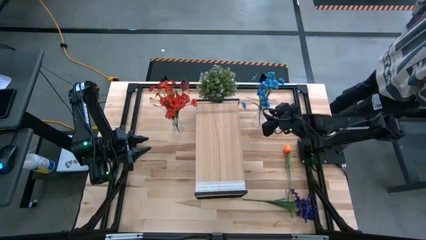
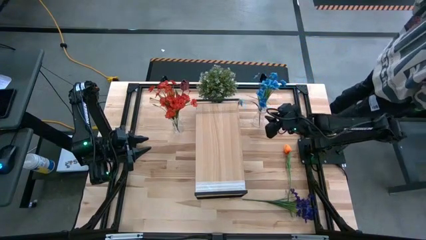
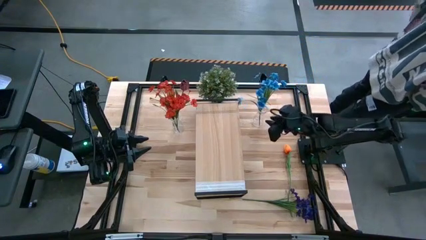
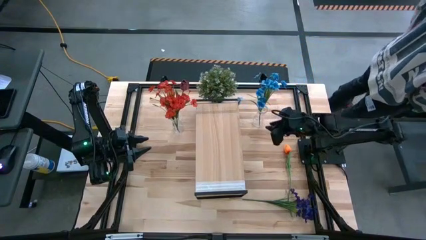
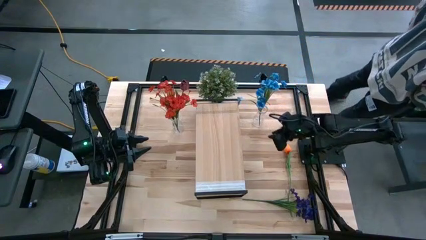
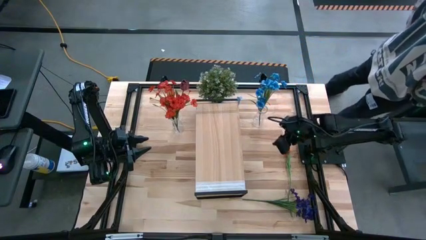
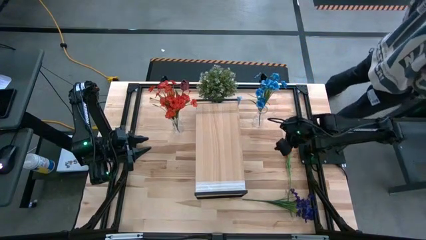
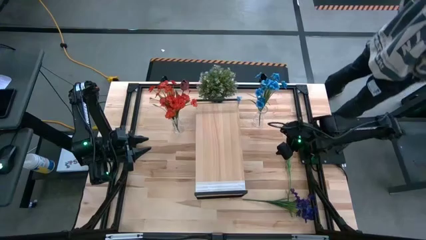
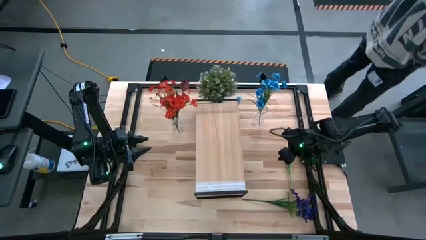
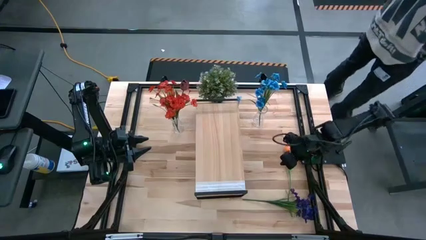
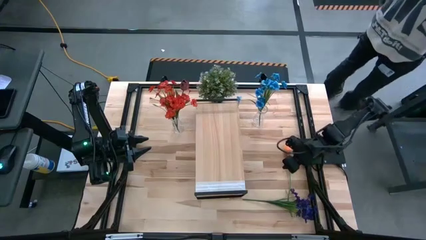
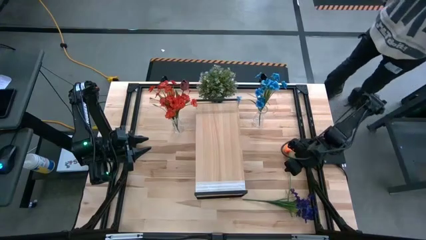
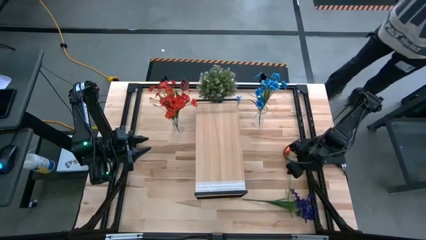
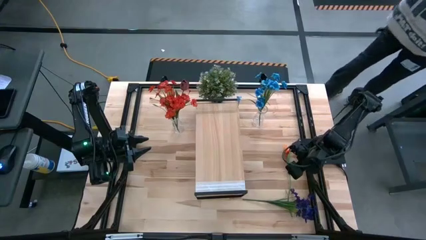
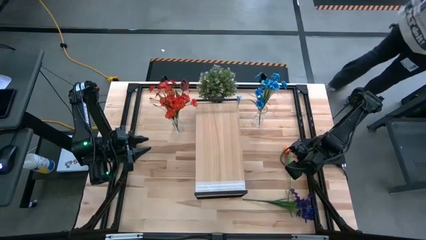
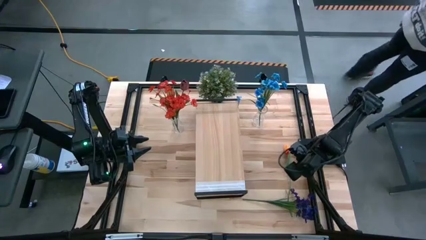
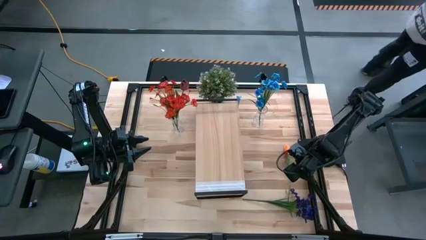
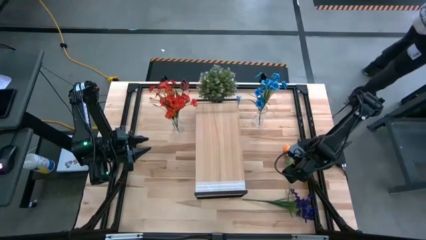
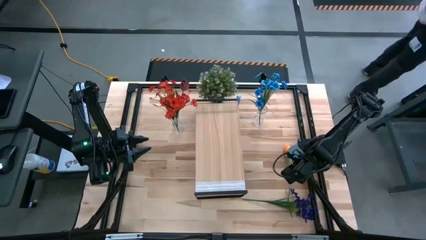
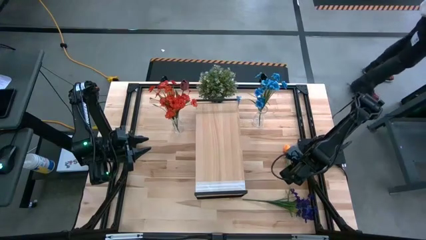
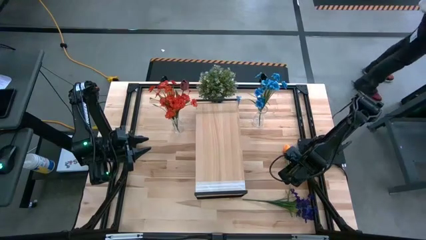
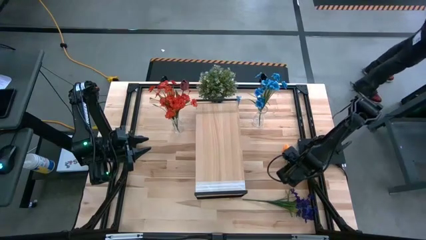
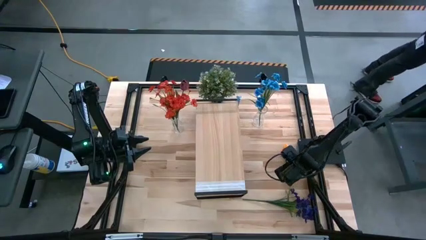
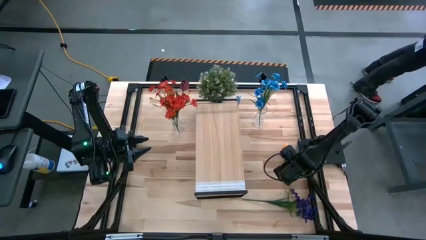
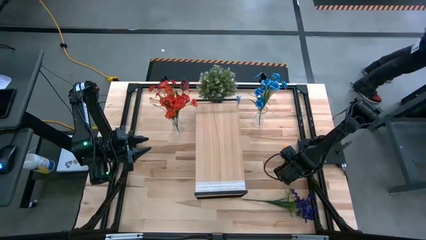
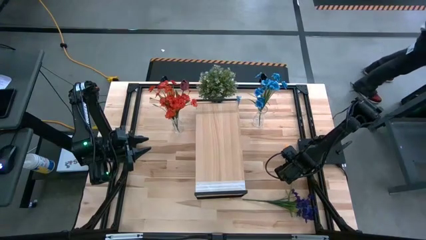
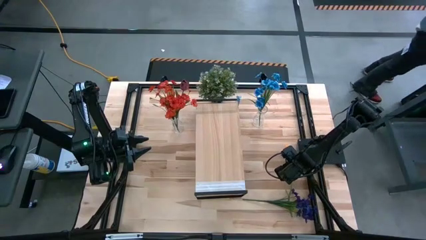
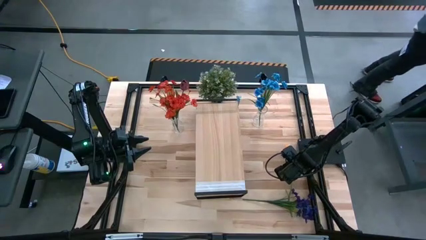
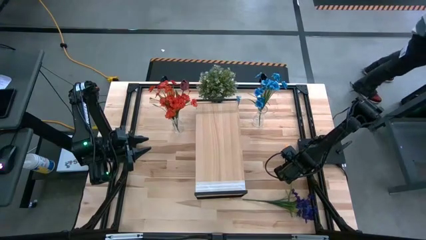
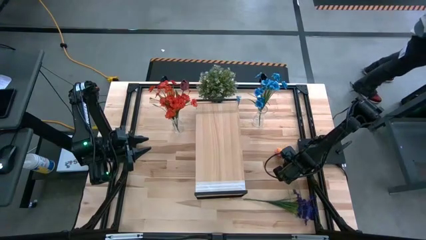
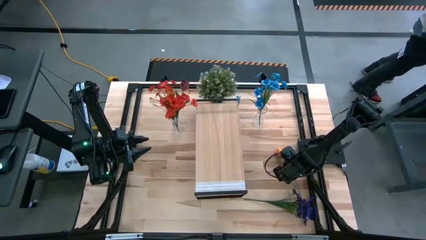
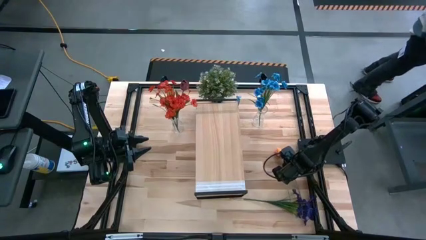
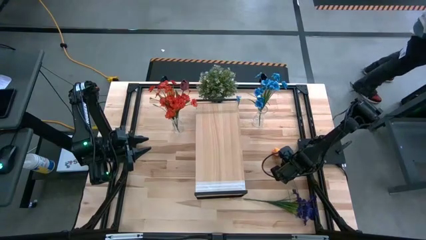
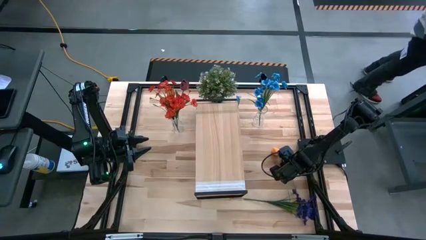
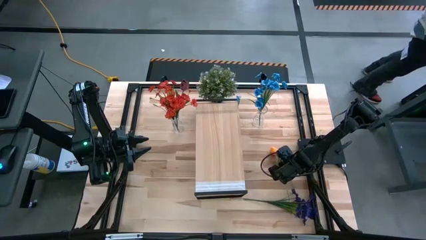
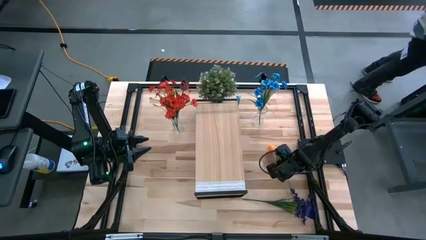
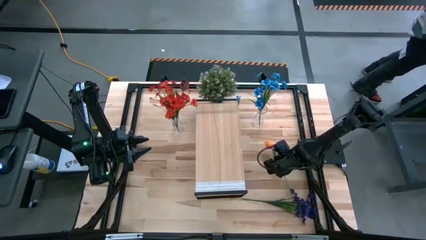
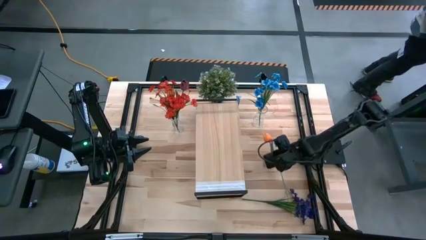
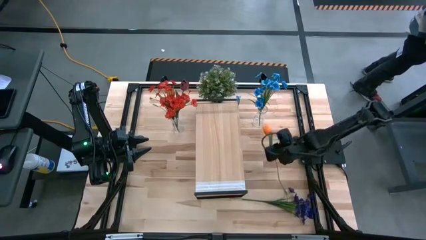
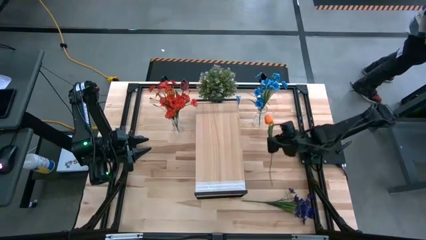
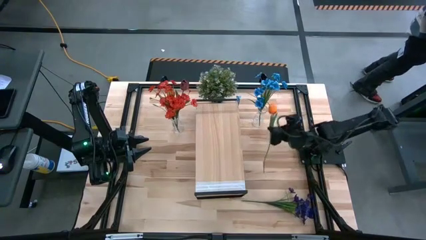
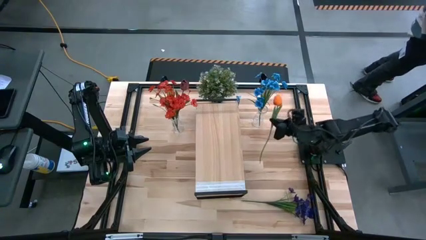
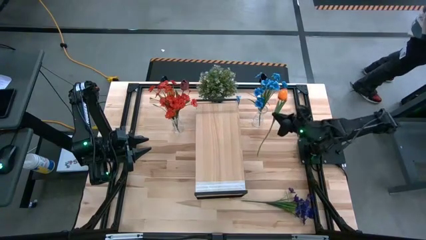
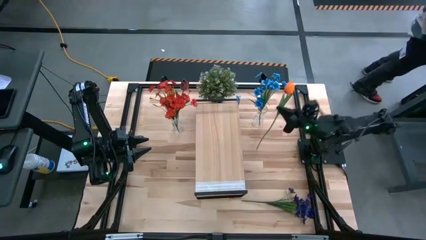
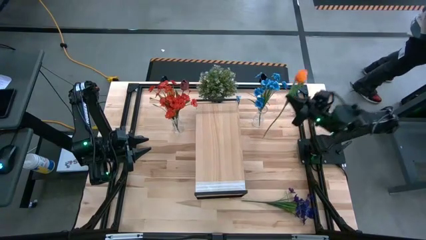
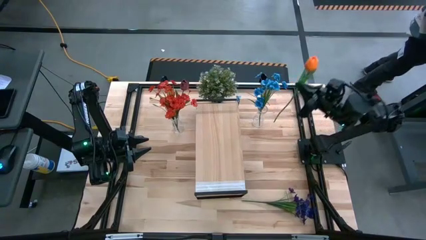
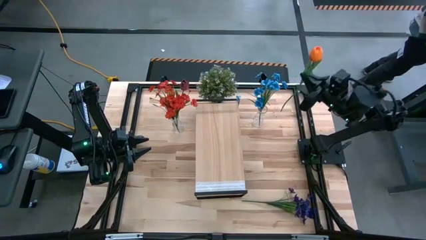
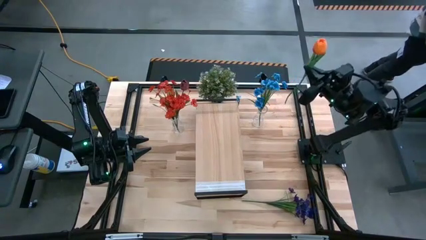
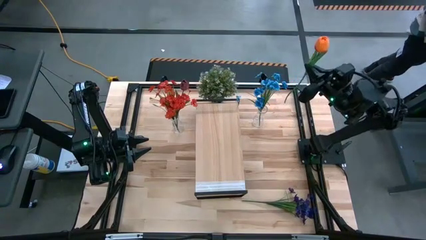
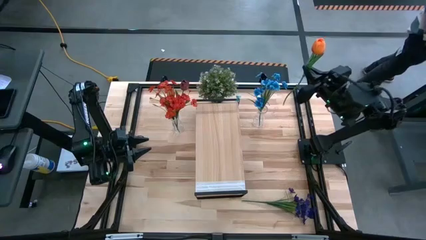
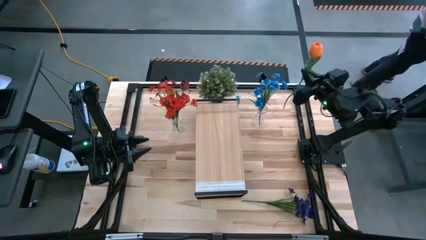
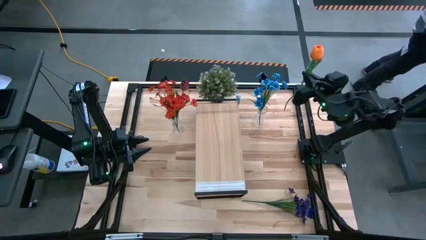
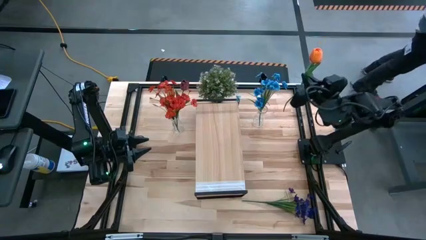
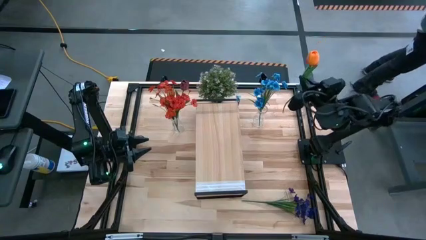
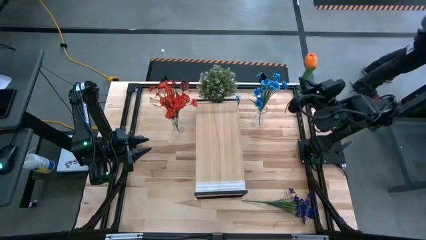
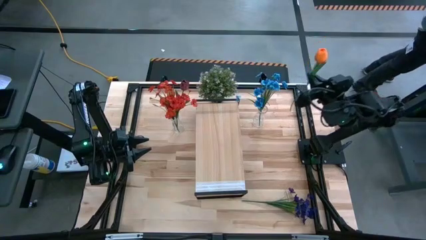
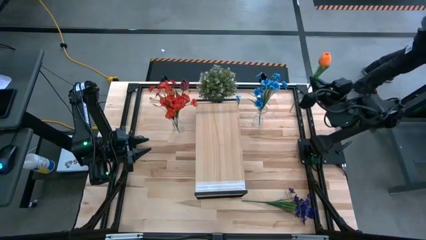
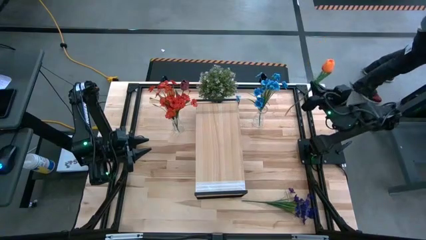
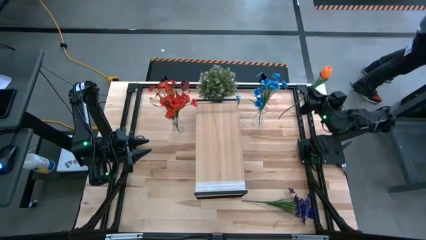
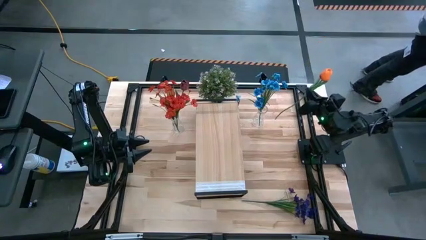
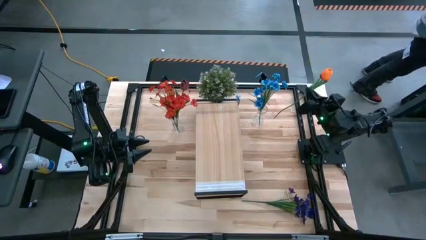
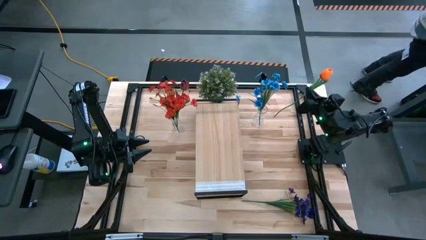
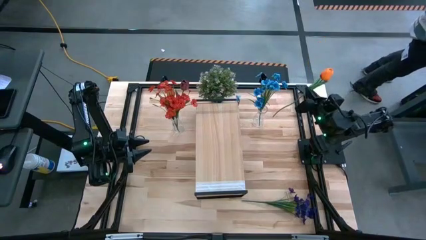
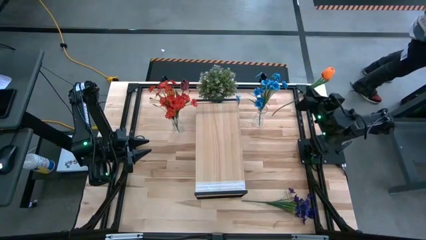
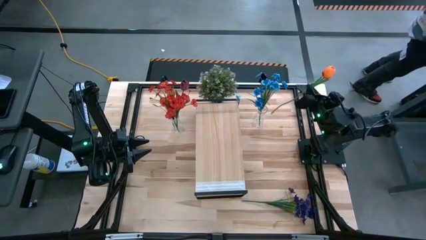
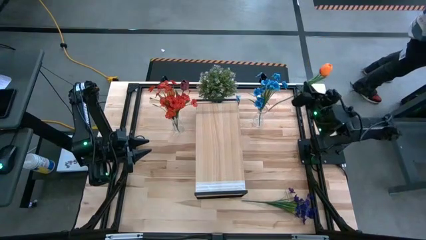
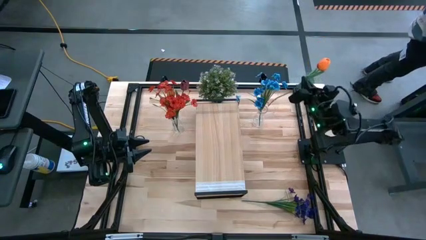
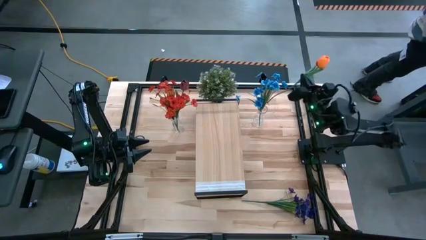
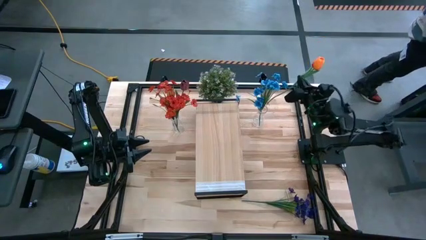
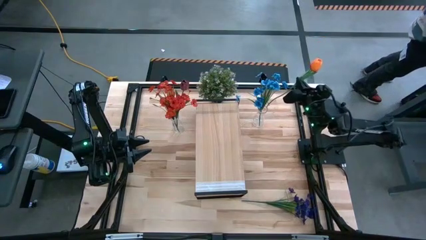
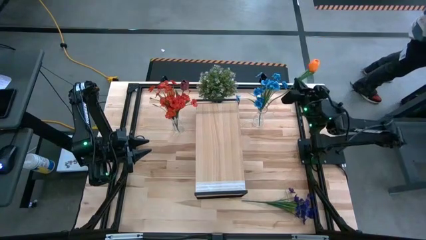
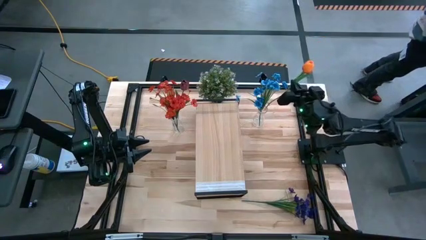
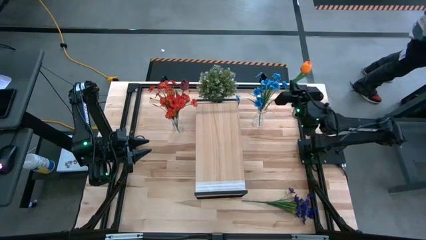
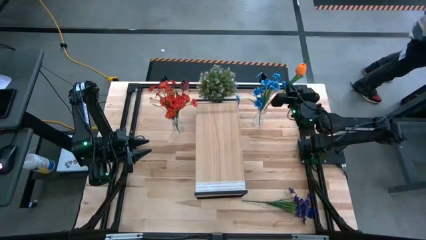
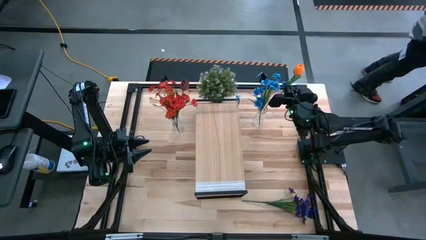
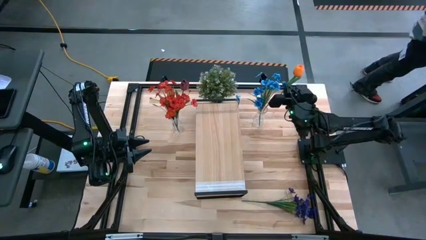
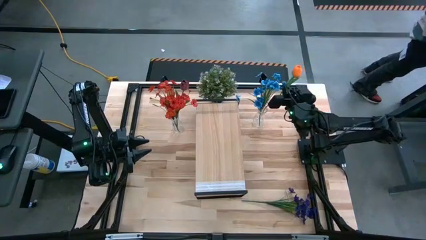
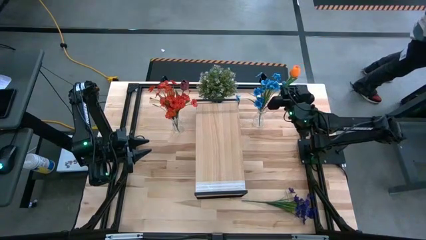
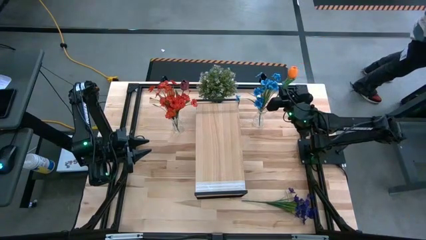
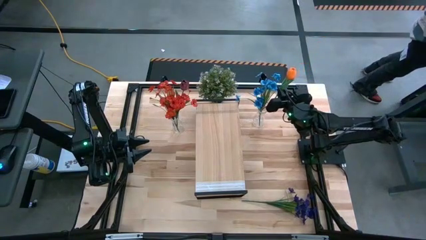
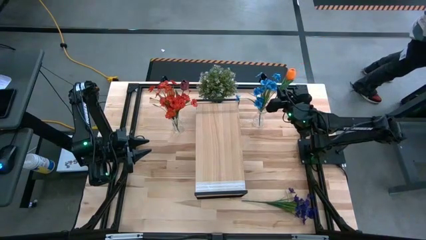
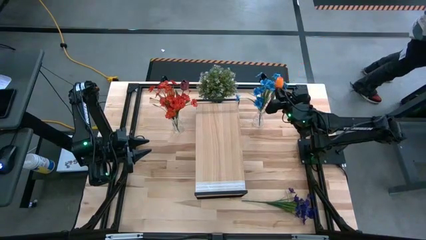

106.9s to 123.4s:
Task: Pick and place flowers into a vace then onto a shelf
Put the orange flower into the right transparent vase
